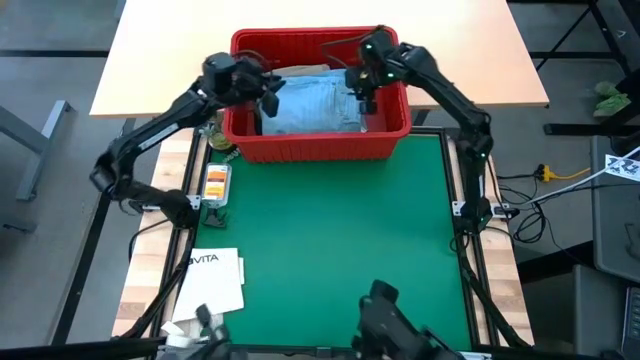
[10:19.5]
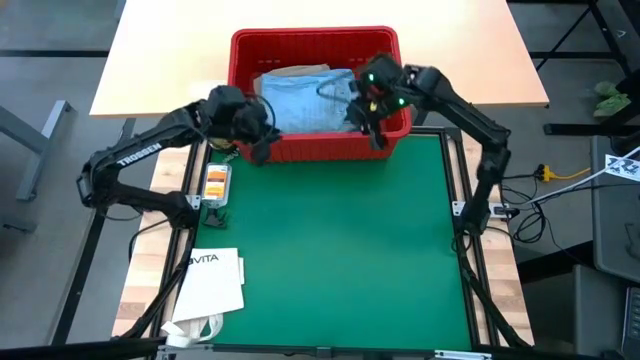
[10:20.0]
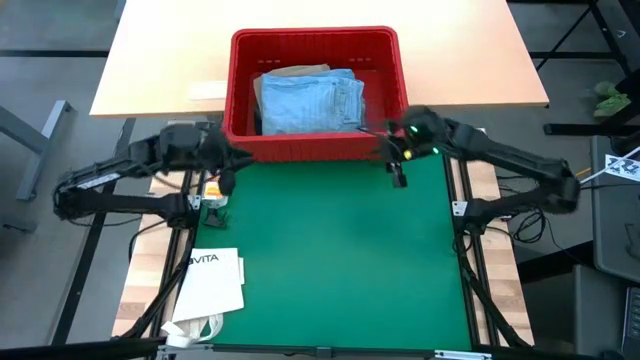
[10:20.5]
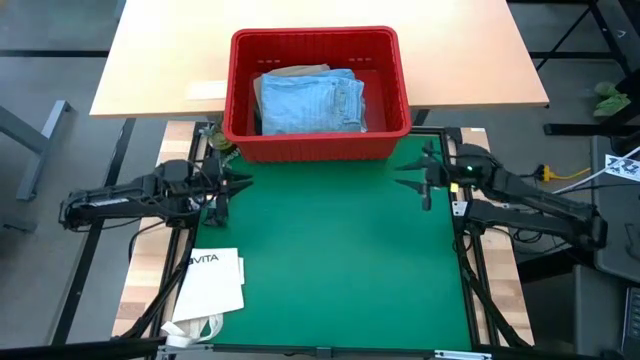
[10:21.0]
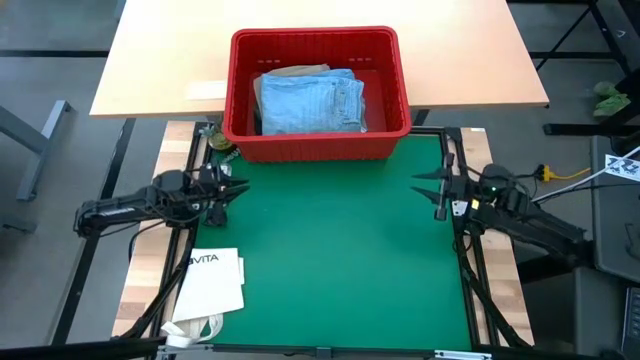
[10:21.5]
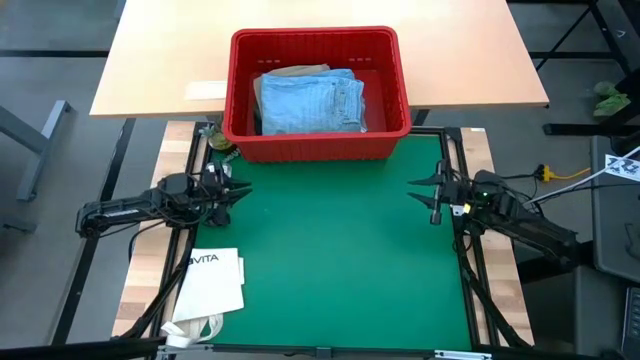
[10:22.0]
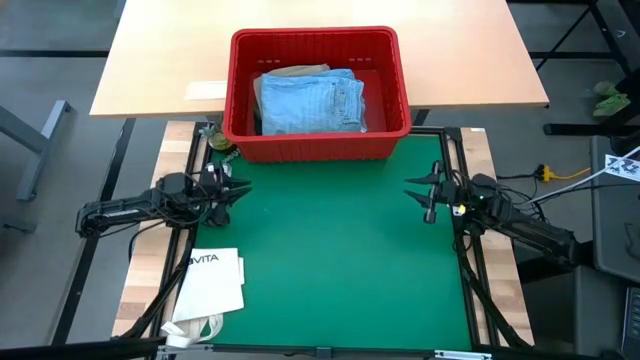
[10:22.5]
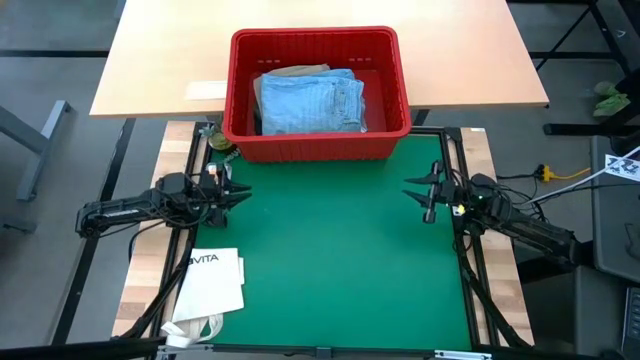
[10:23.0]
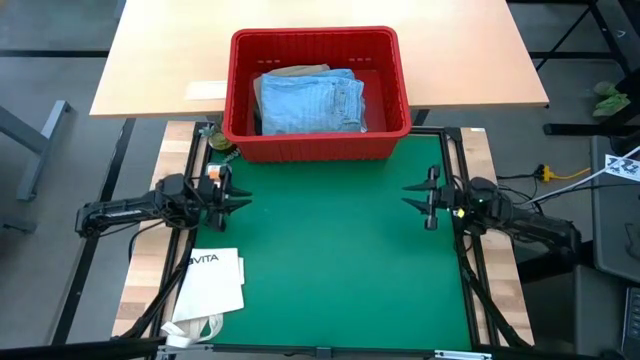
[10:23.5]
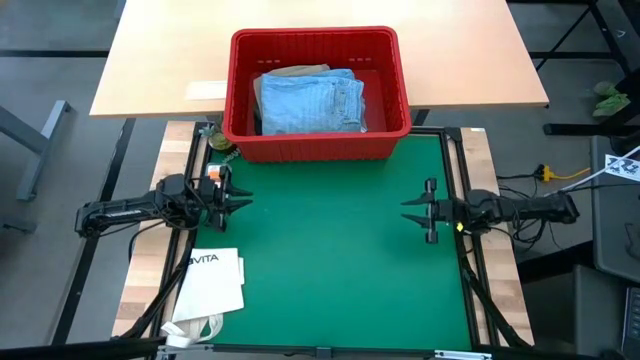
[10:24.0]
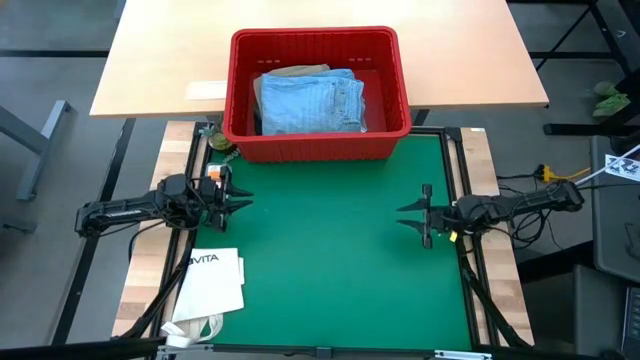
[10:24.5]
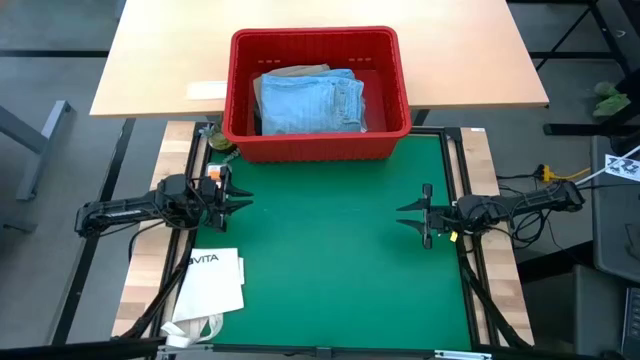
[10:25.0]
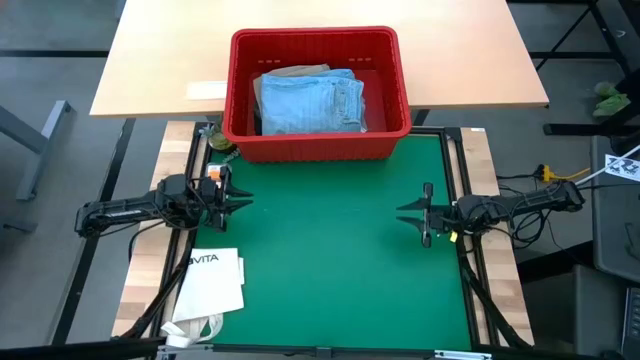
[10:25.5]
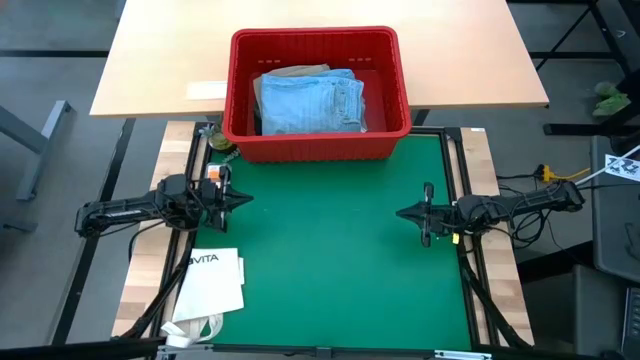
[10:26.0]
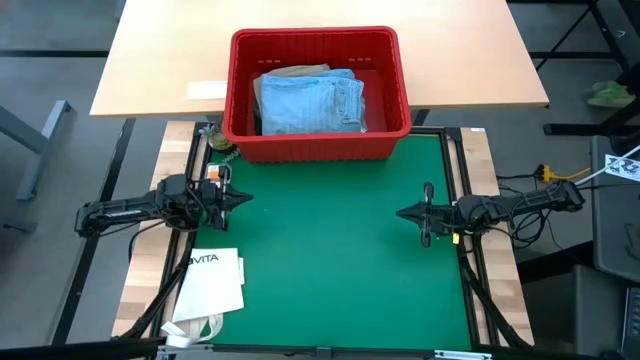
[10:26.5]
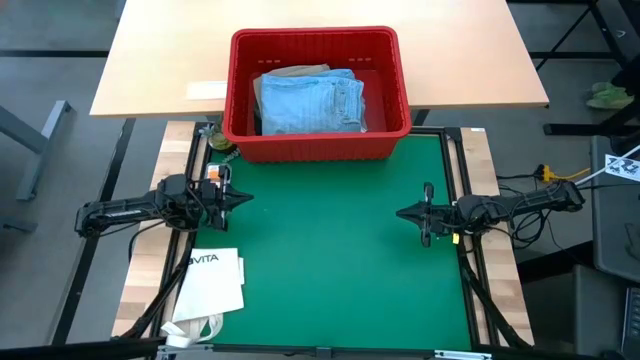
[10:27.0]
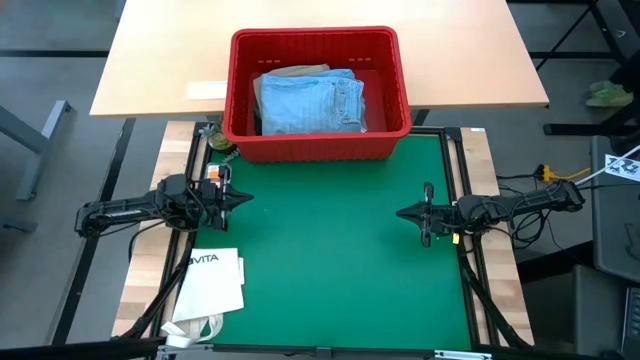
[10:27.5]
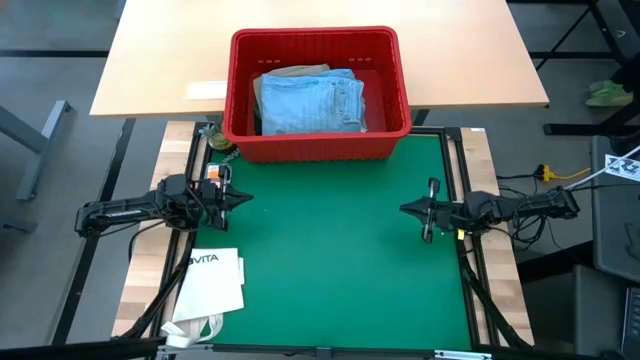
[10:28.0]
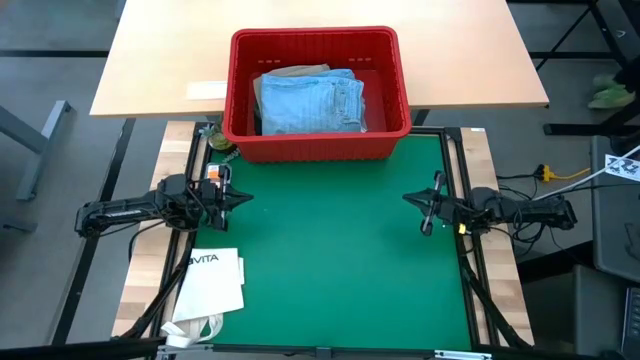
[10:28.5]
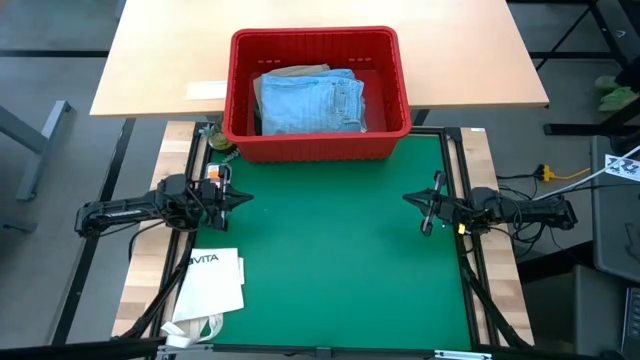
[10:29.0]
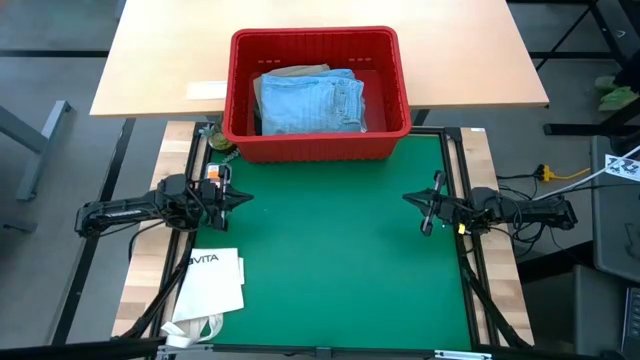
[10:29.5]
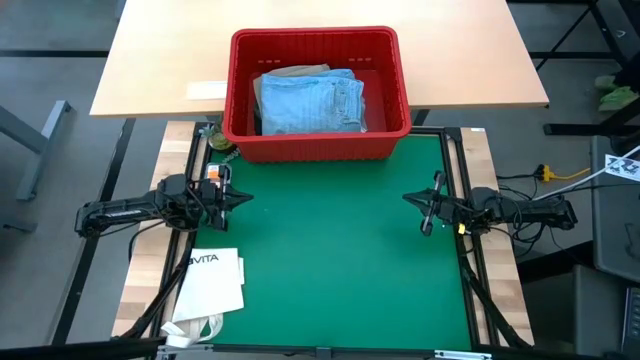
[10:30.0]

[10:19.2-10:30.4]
Task: Fold Laundry from Bin
Return to Home Position

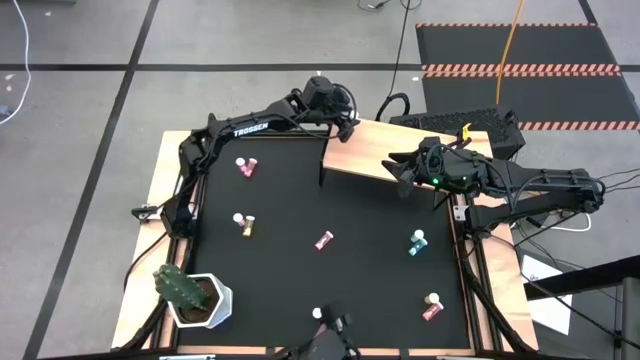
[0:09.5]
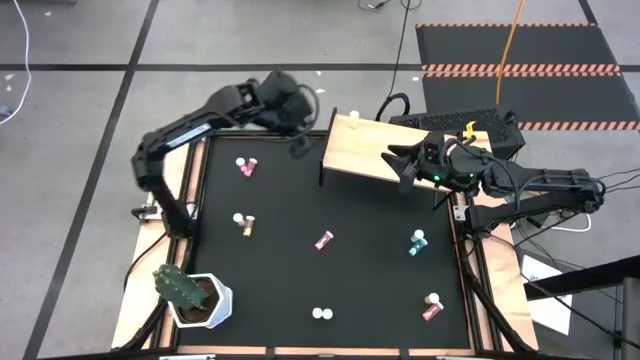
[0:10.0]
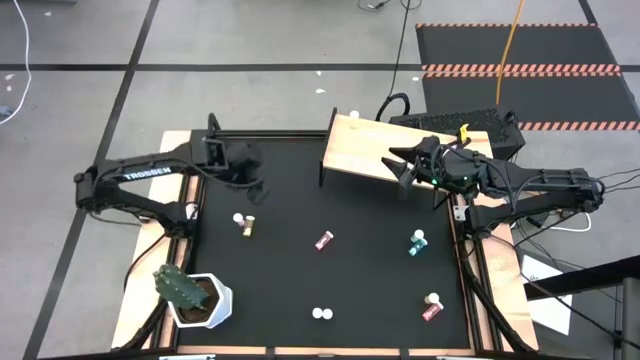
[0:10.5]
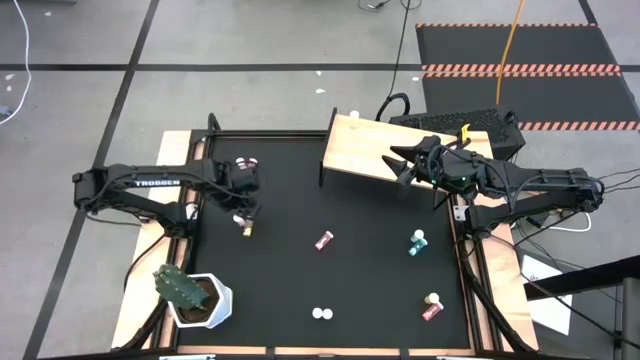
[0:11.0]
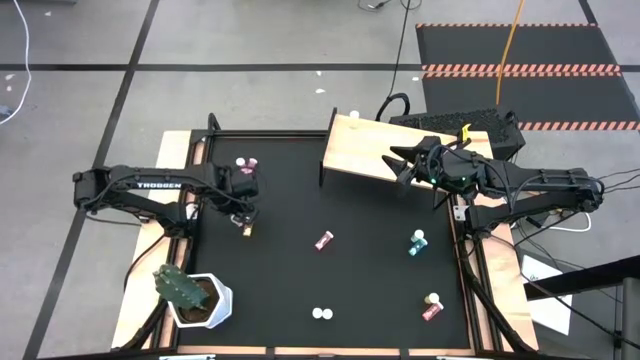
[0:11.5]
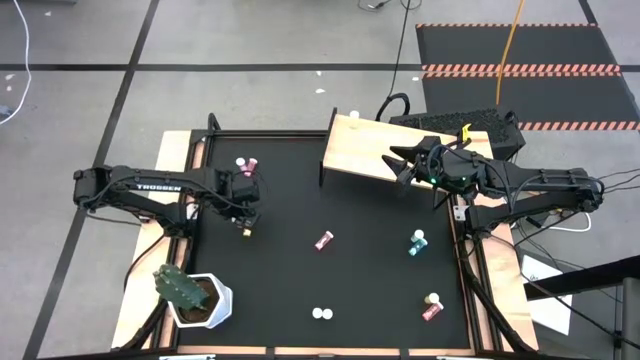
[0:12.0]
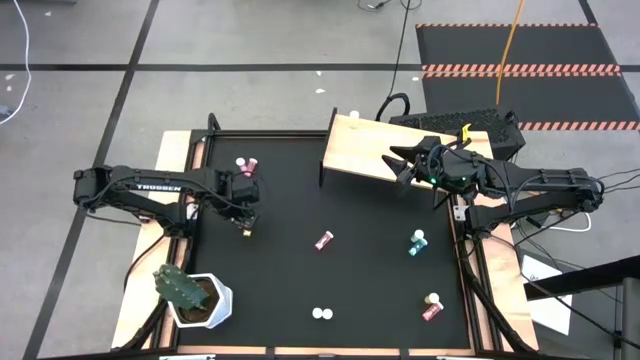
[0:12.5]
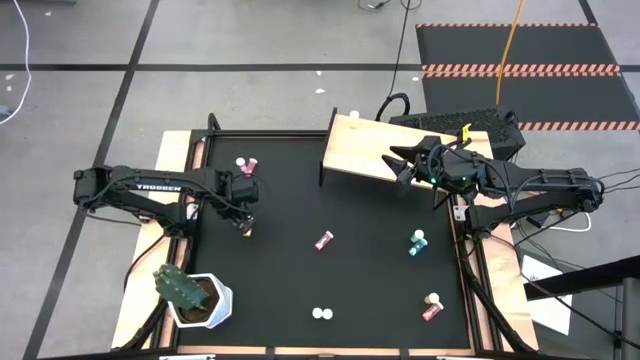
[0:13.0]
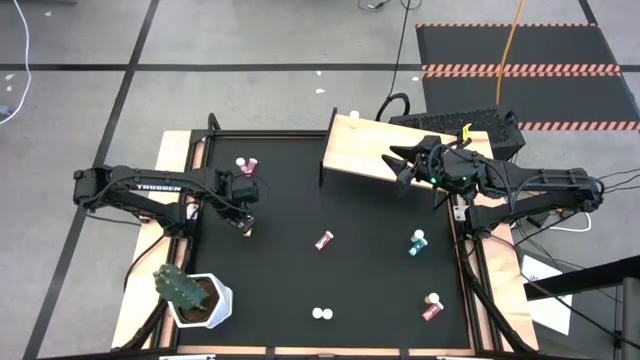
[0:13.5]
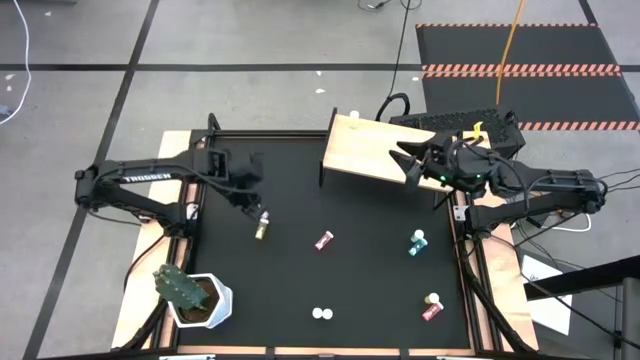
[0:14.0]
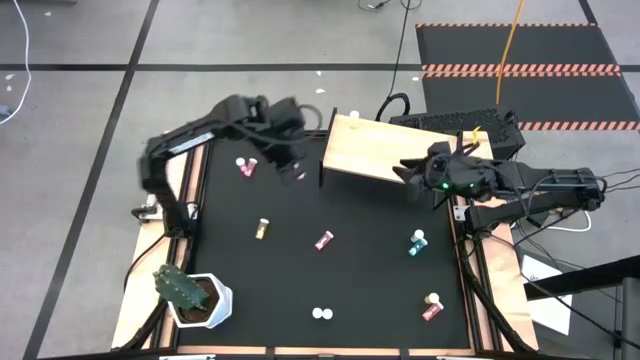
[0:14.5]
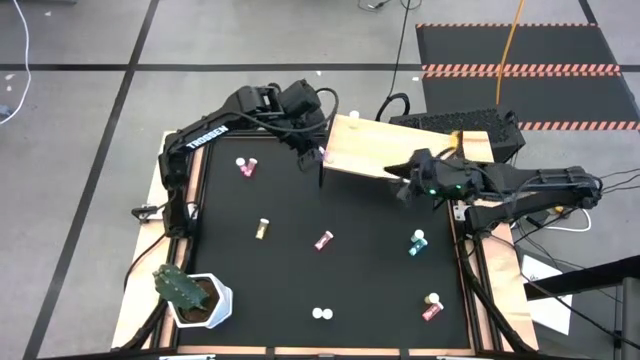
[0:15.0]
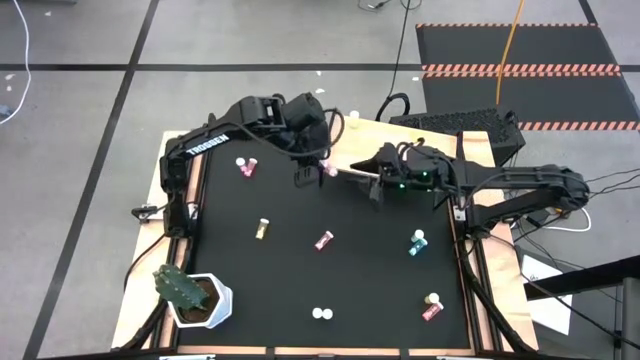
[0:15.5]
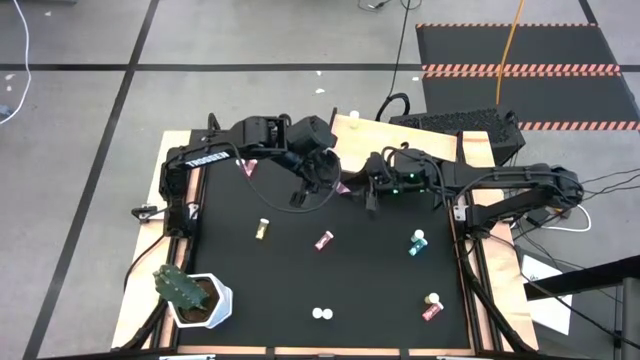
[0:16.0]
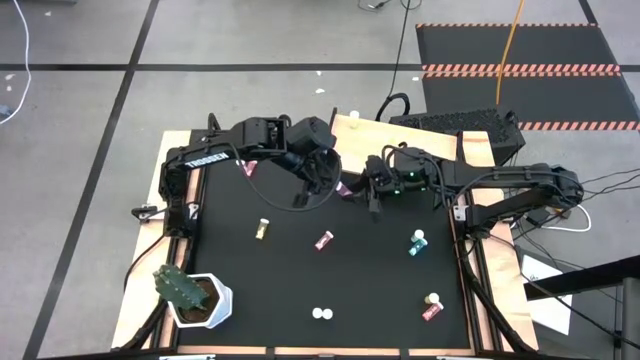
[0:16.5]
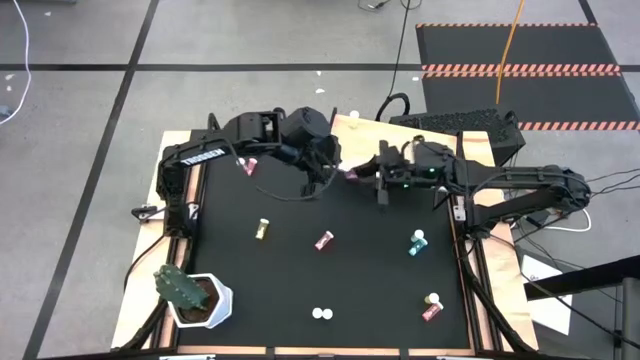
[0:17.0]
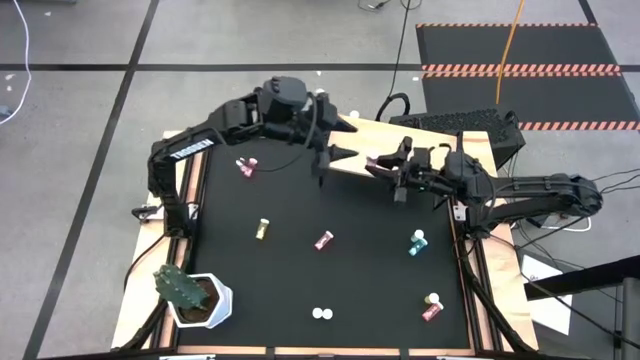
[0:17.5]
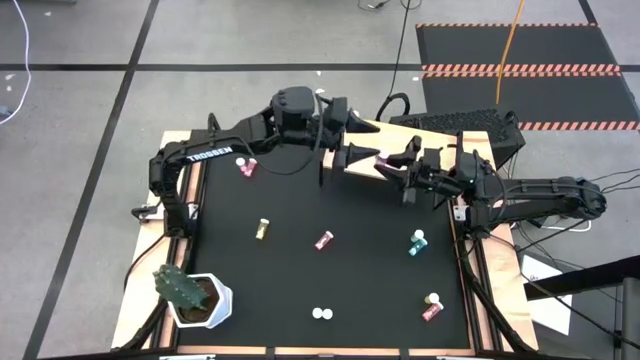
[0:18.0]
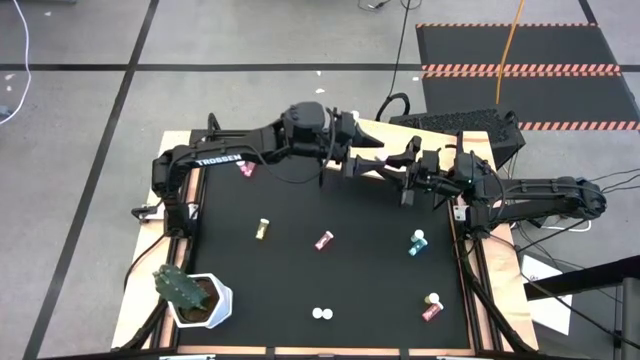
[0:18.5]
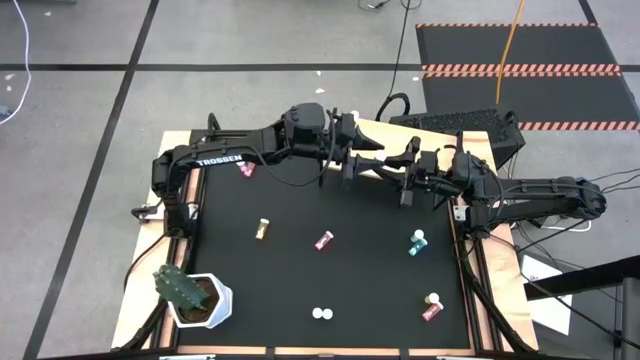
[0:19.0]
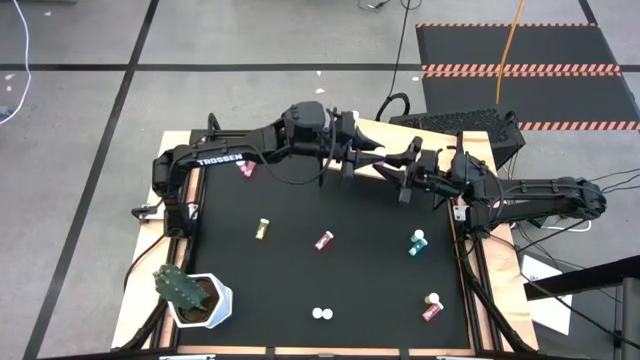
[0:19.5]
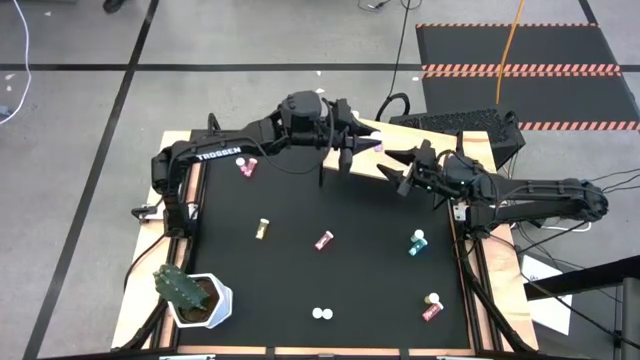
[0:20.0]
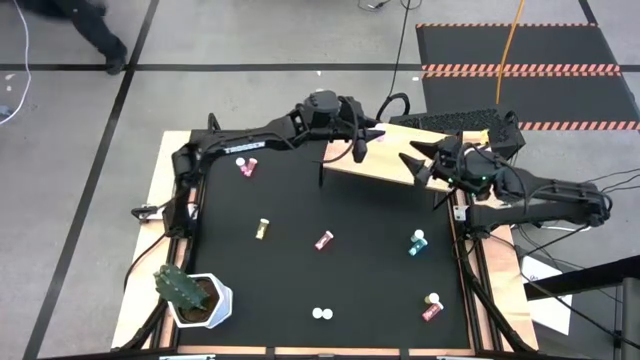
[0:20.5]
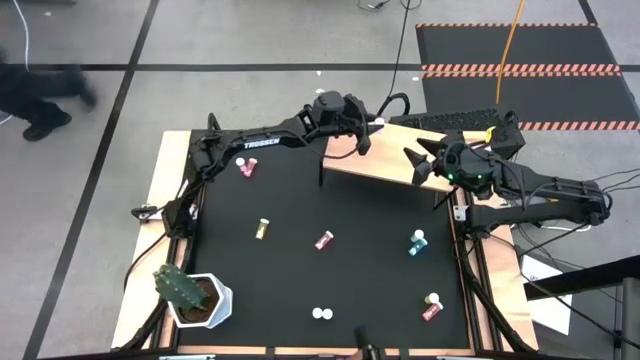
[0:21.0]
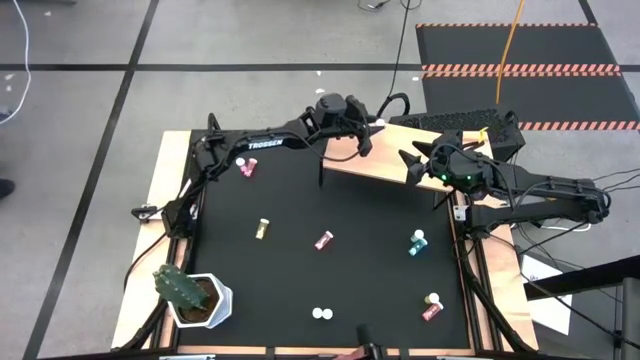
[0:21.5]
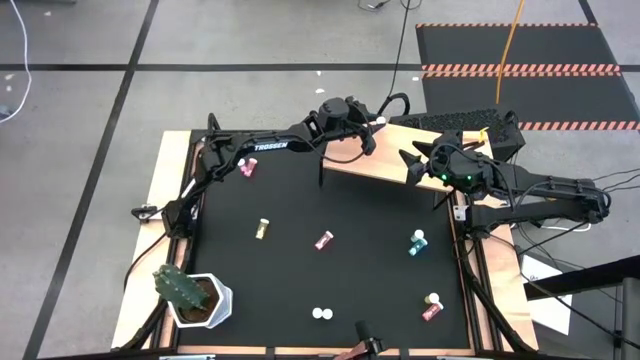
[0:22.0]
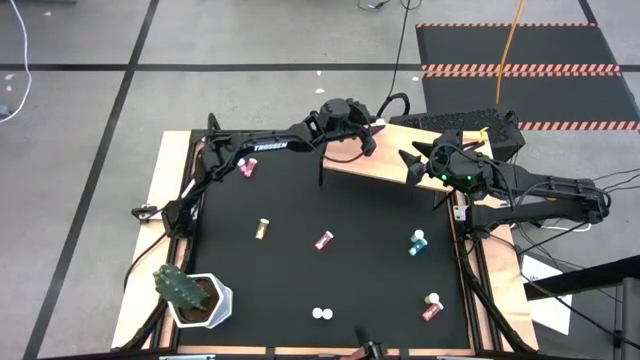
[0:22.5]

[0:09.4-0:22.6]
Task: Pick and place medicine bottles onto shelf by color
Put the middle left pink pill bottle on the shelf
